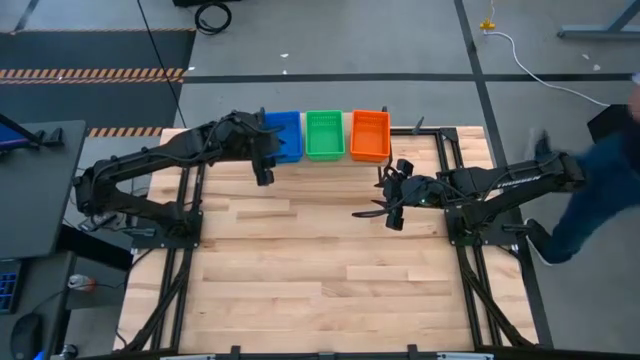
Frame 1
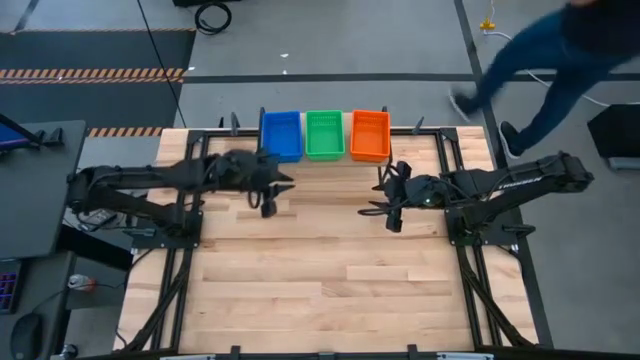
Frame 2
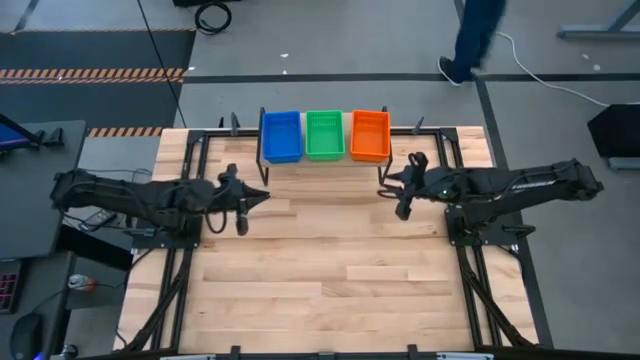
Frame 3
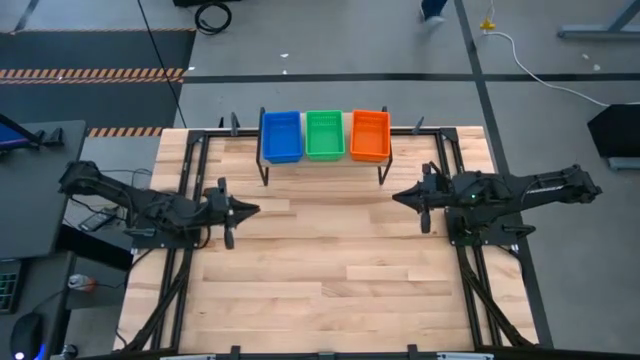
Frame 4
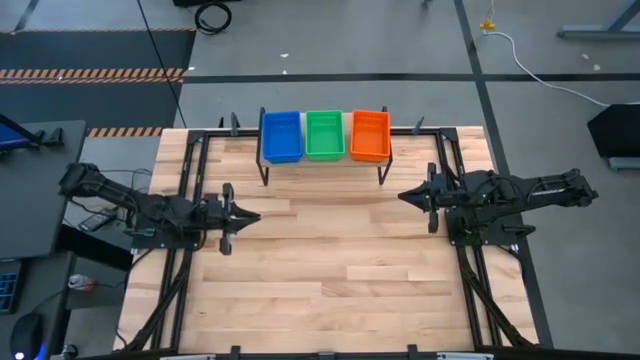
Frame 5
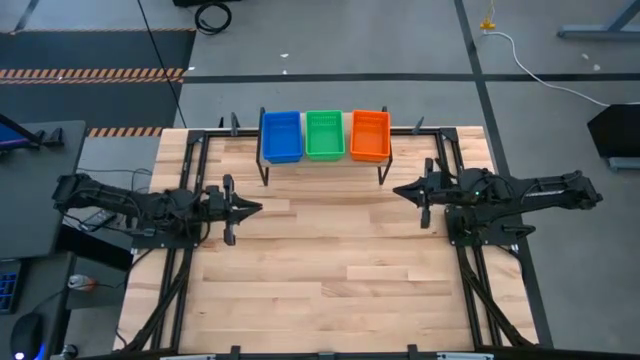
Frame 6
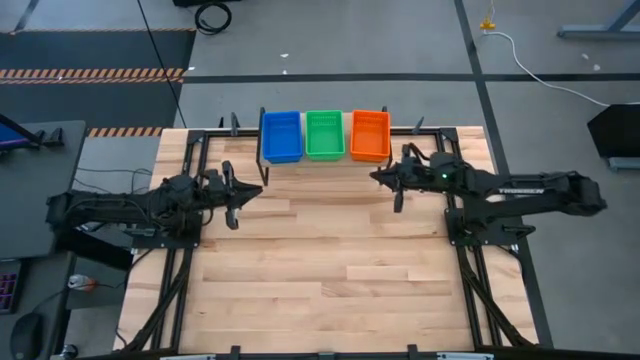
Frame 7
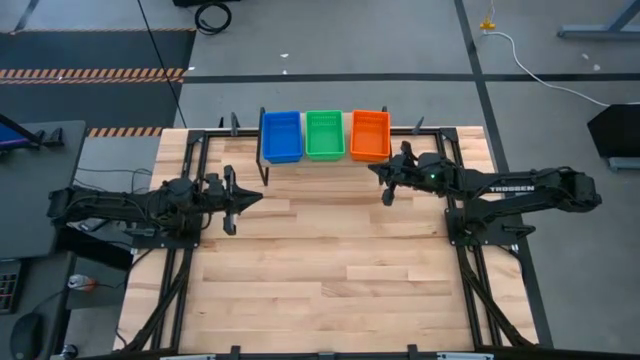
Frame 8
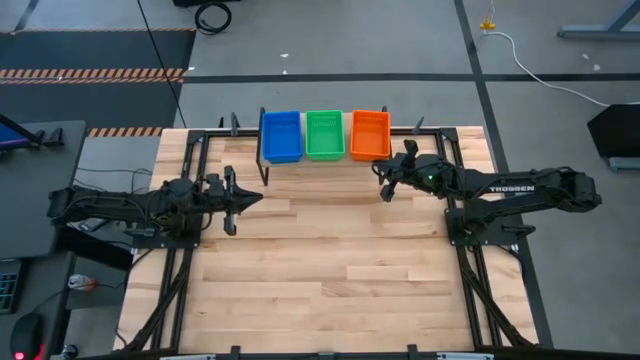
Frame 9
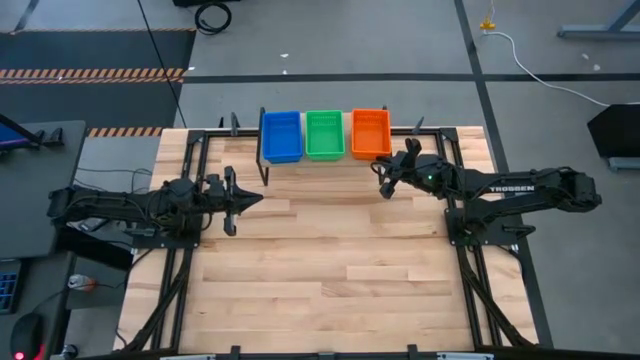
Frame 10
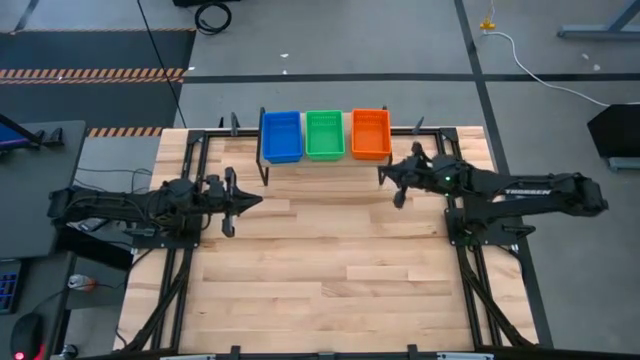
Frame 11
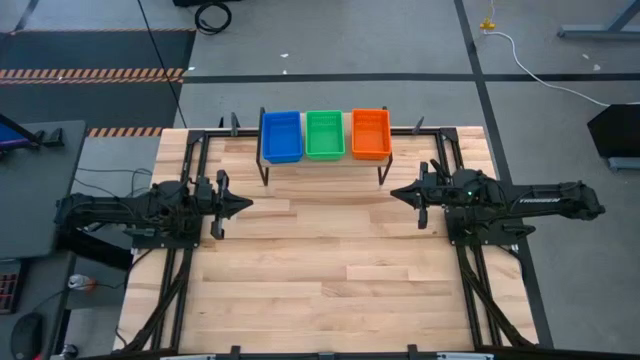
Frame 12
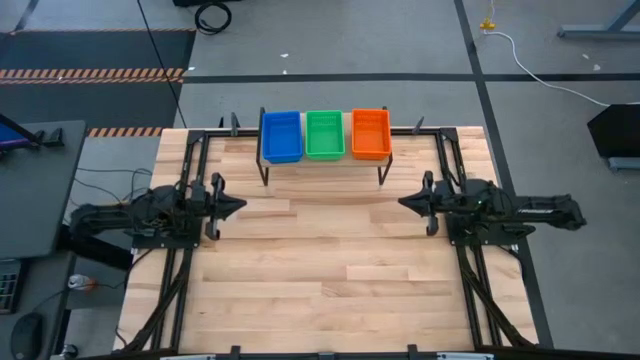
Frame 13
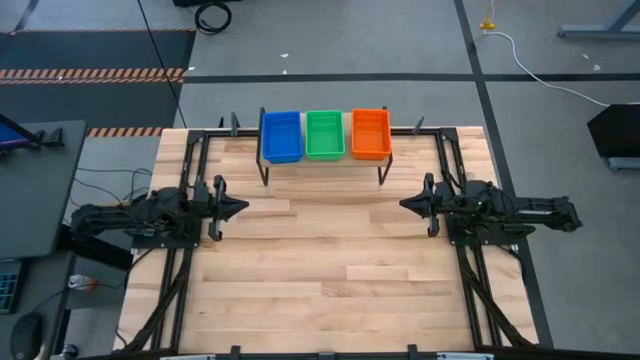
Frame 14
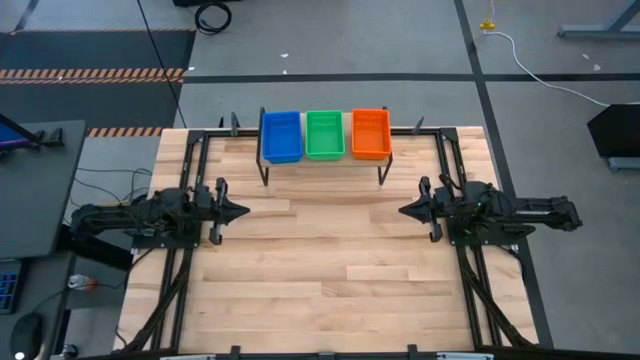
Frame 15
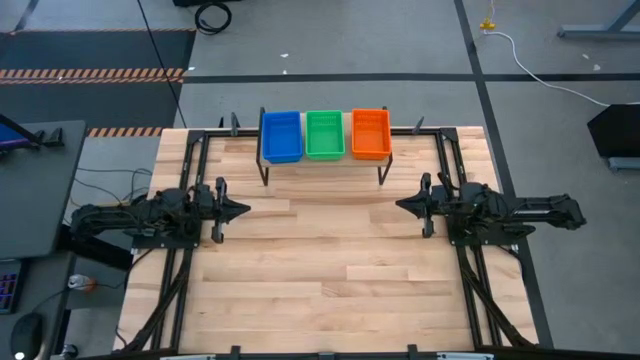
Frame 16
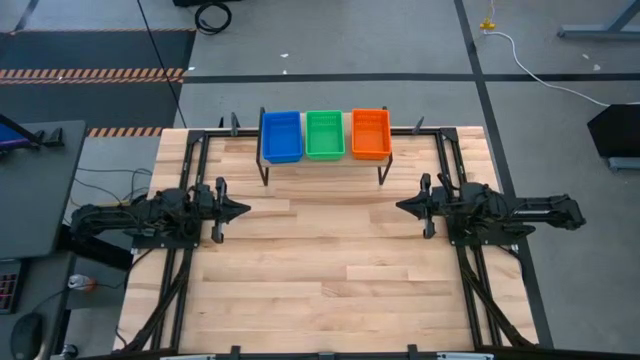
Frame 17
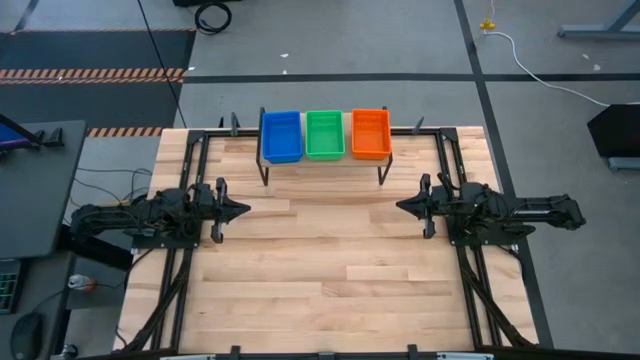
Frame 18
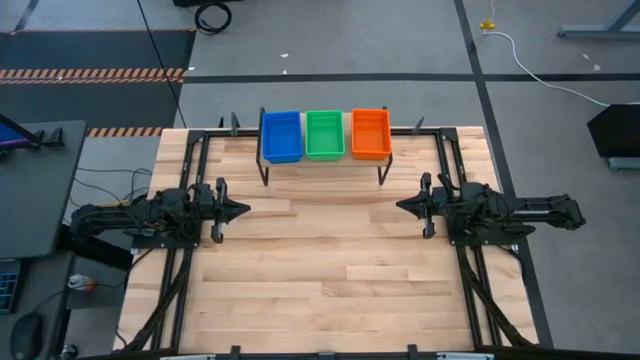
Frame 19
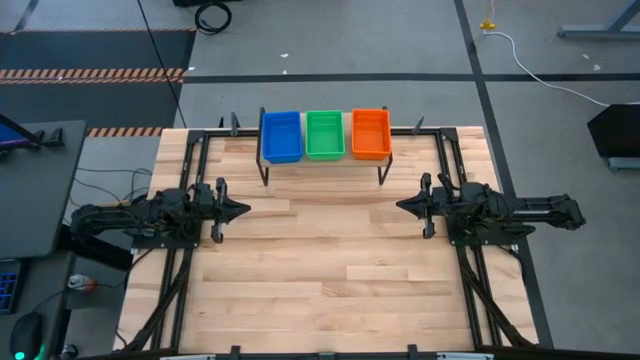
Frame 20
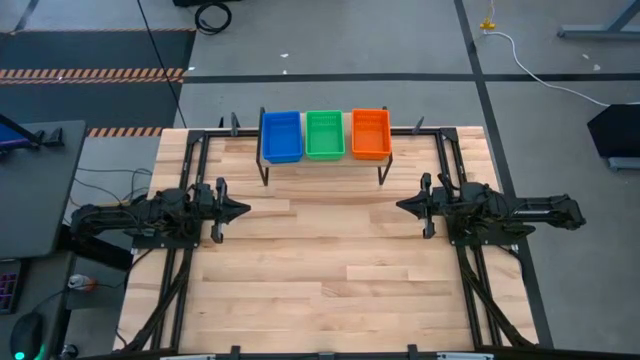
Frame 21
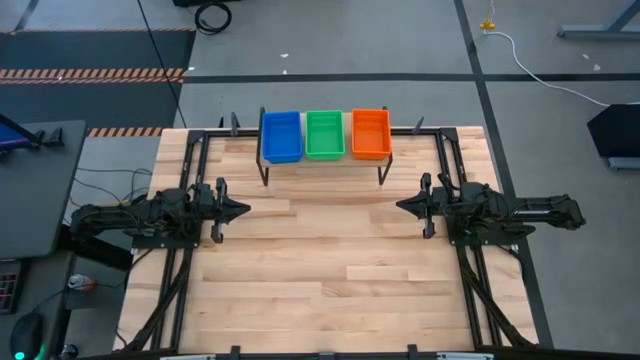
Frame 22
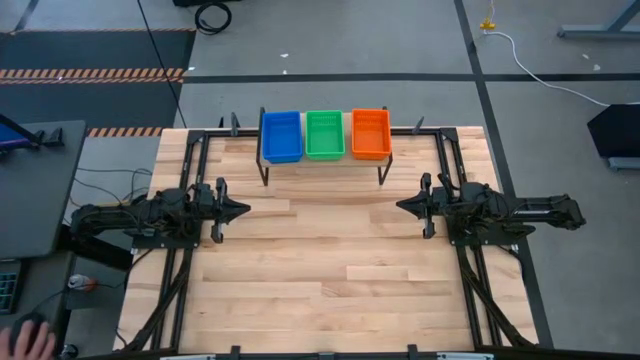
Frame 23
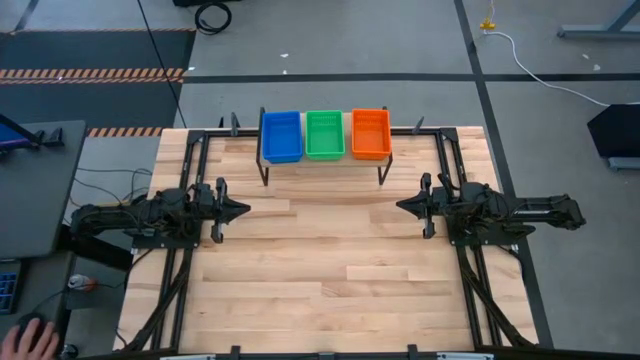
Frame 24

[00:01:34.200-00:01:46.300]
Task: Stack baskets on shelf by color
Return to Home Position

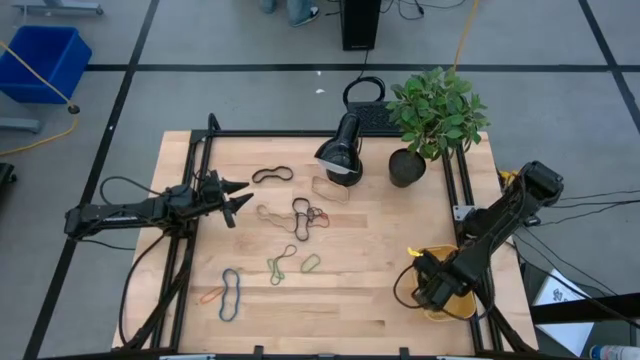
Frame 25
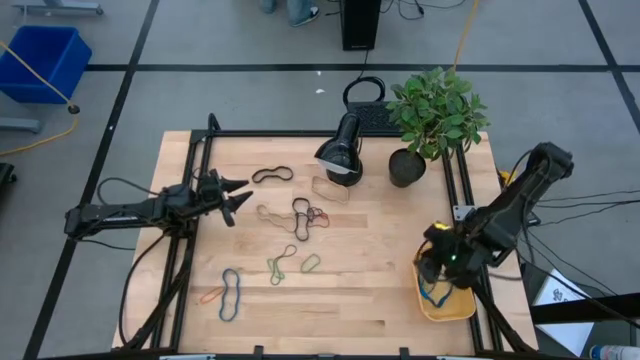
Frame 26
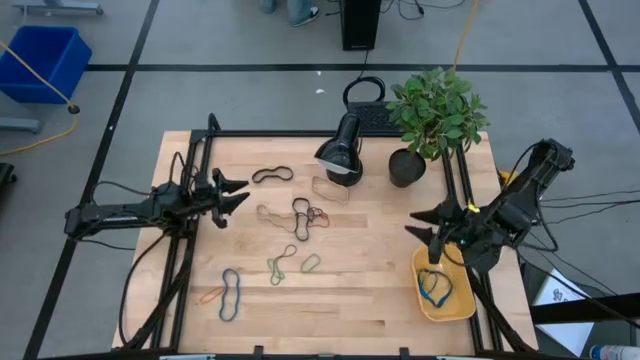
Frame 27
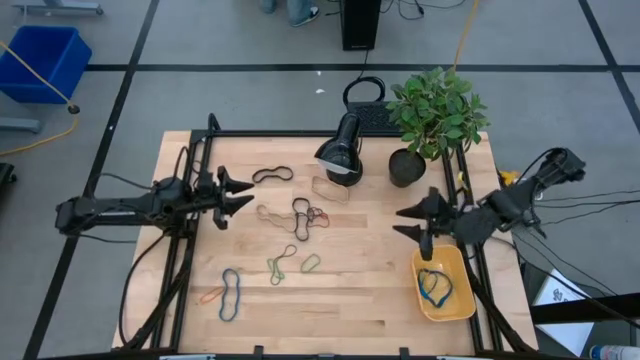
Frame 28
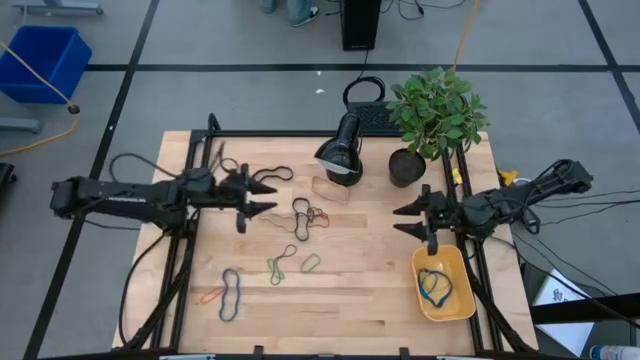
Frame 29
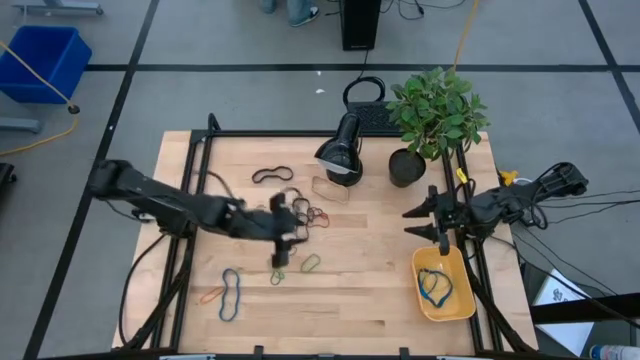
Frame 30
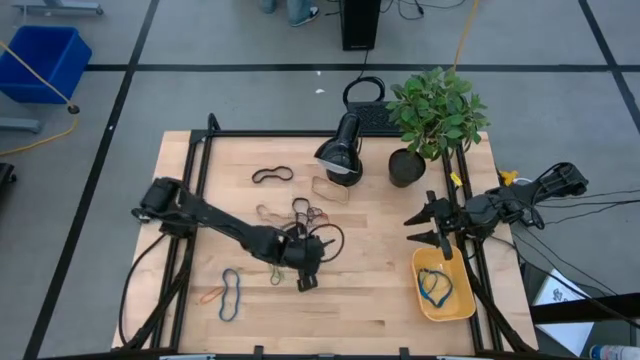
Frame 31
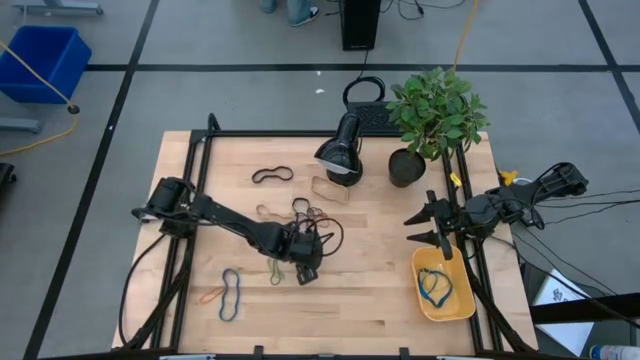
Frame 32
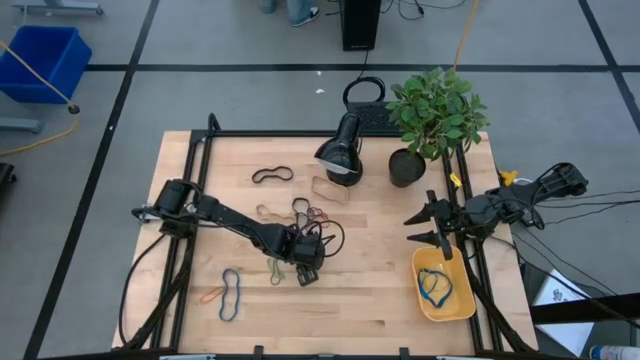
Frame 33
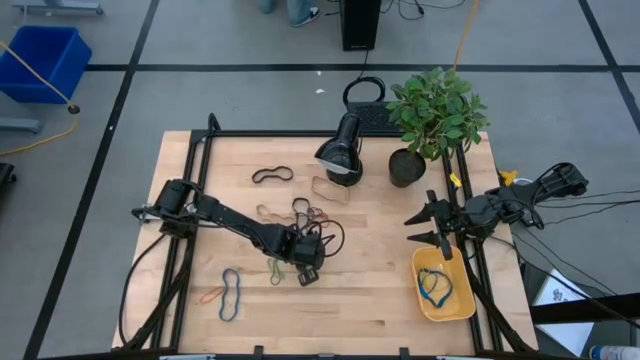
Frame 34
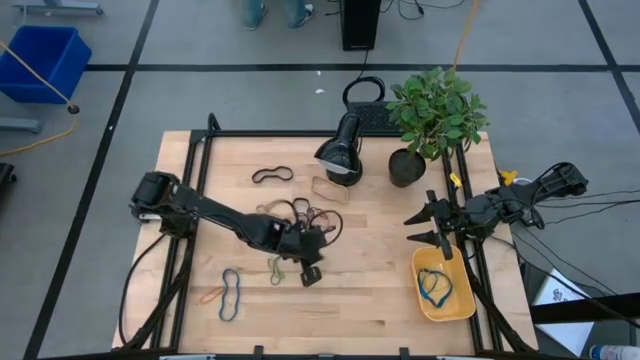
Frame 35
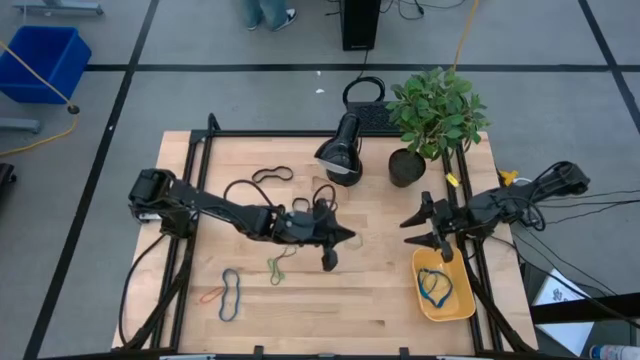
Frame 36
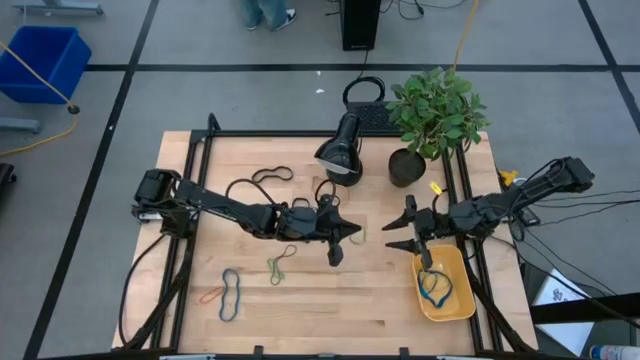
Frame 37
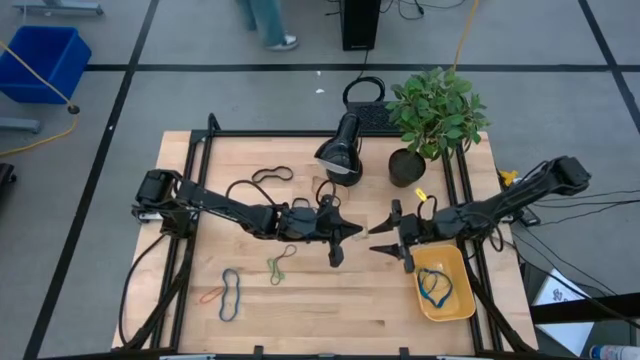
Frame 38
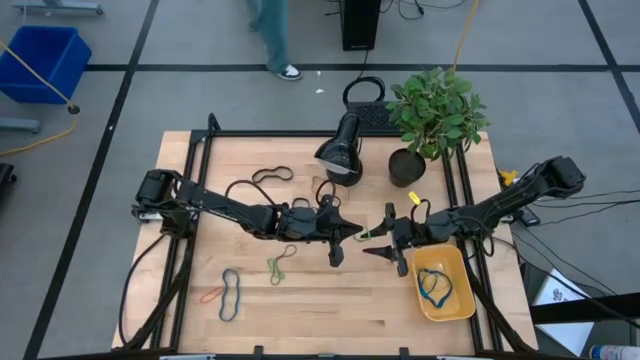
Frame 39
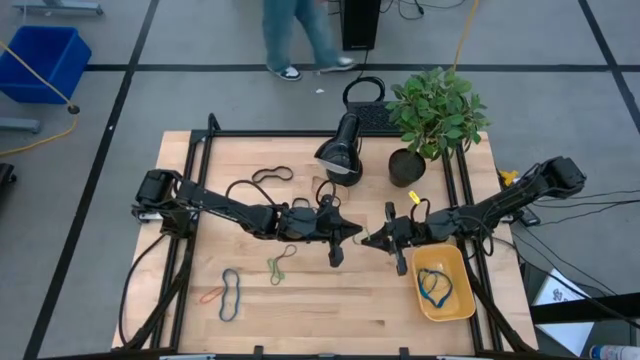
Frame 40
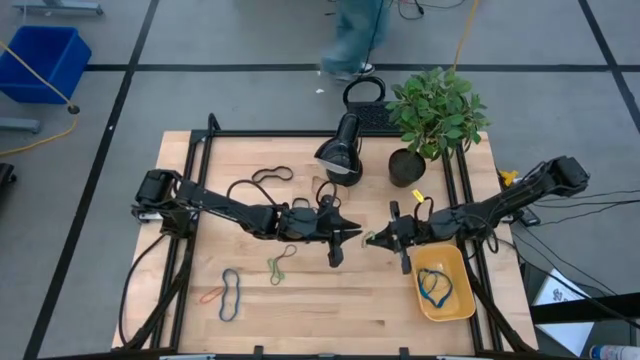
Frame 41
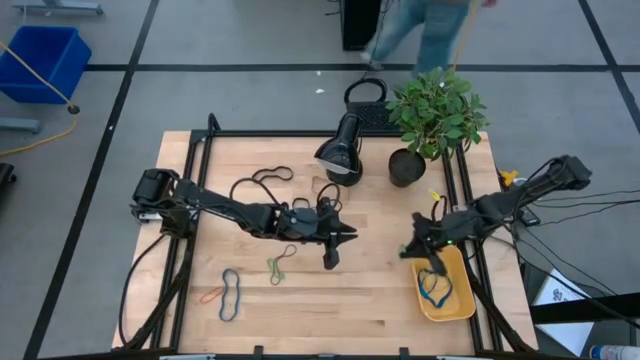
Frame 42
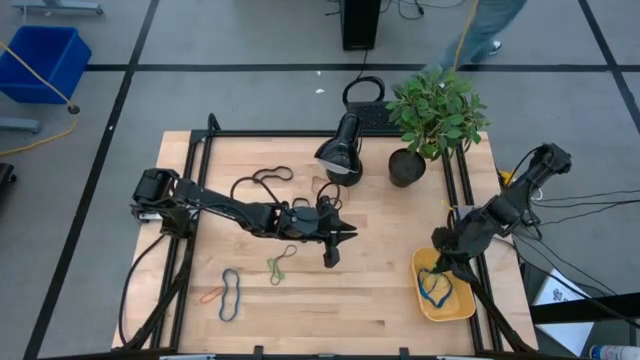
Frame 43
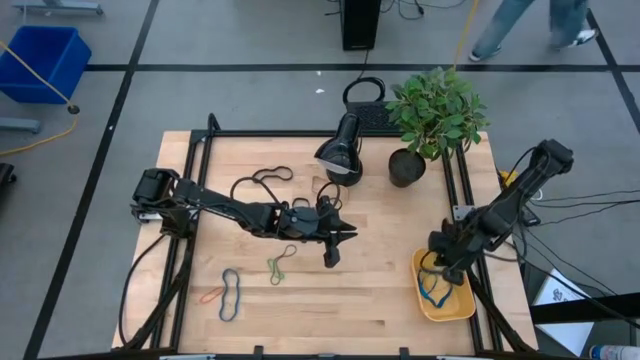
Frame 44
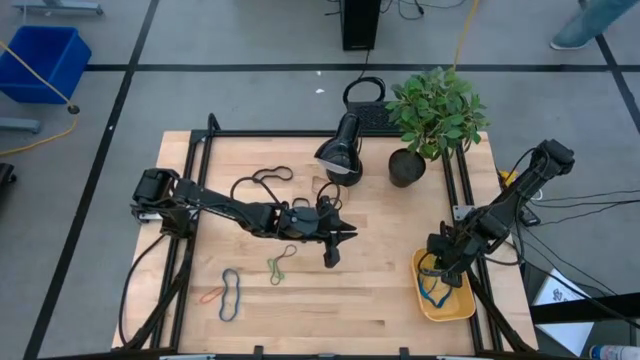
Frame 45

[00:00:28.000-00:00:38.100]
Task: Pick and place rubber bands into bin
Put the green rubber band into the yellow bin
